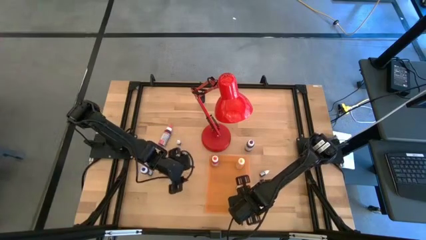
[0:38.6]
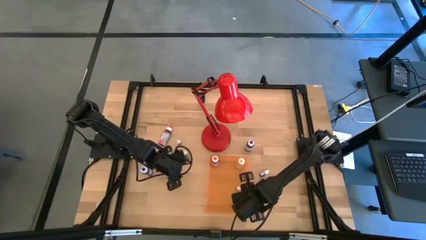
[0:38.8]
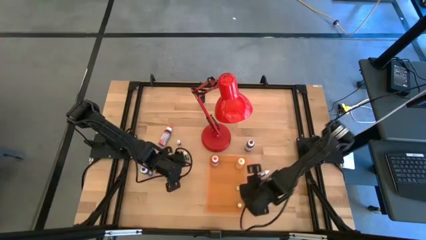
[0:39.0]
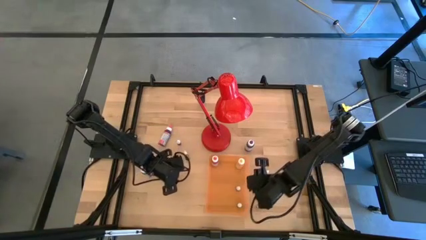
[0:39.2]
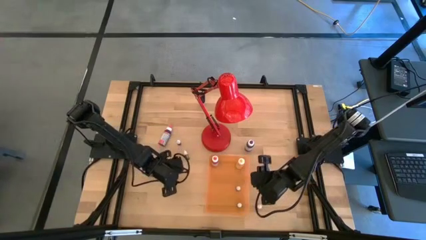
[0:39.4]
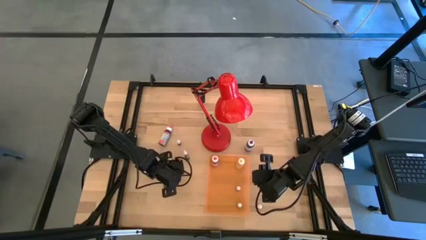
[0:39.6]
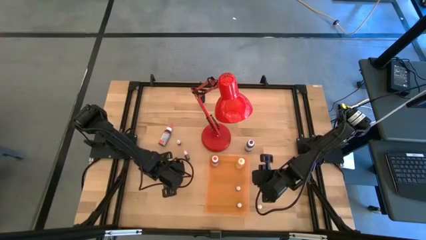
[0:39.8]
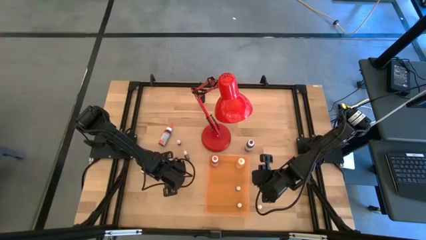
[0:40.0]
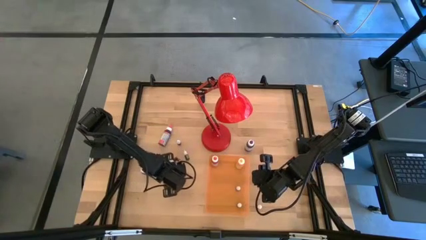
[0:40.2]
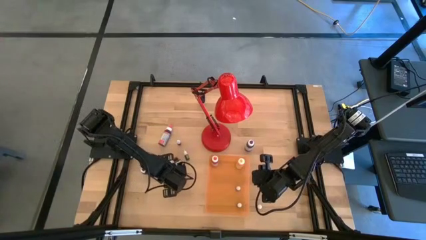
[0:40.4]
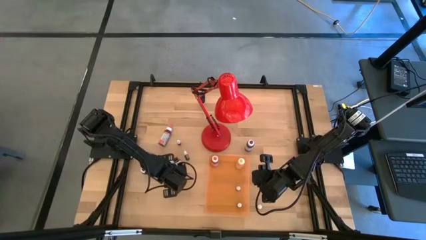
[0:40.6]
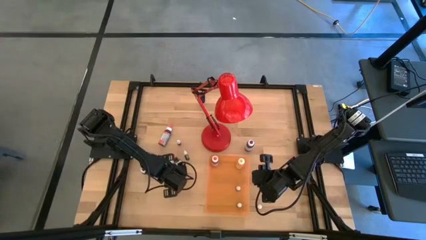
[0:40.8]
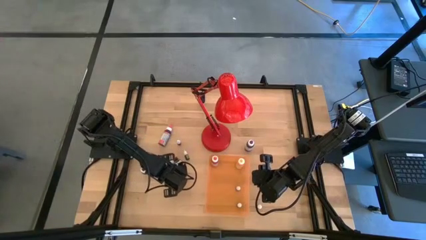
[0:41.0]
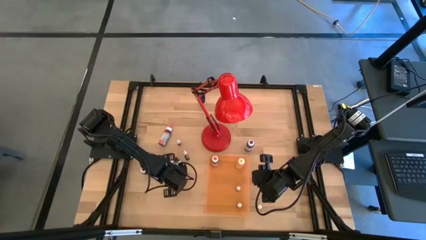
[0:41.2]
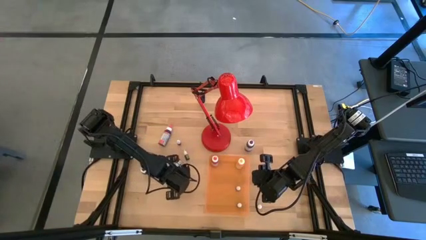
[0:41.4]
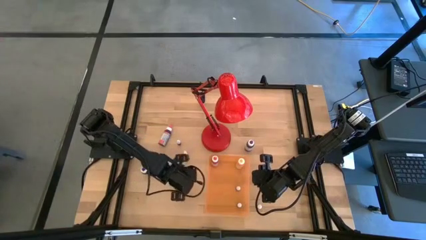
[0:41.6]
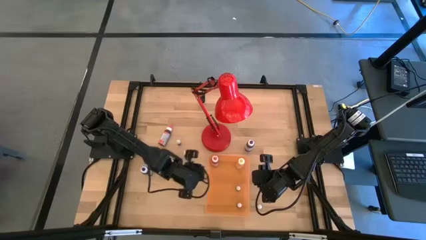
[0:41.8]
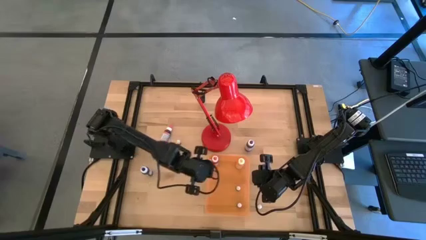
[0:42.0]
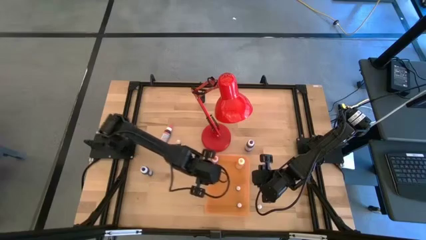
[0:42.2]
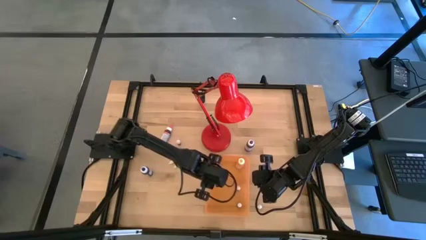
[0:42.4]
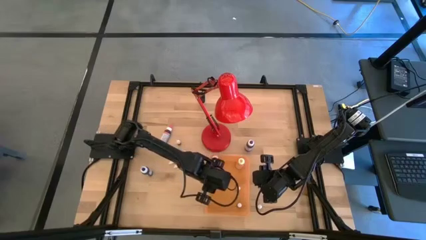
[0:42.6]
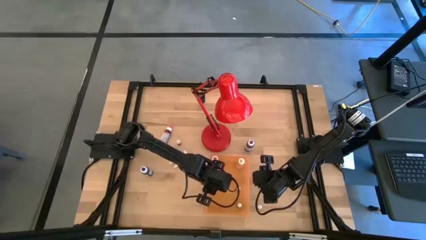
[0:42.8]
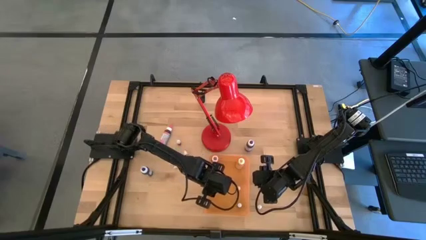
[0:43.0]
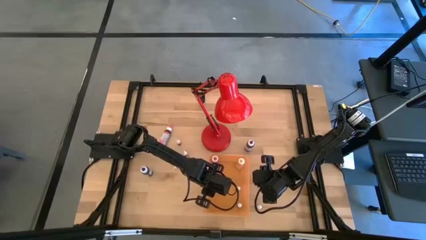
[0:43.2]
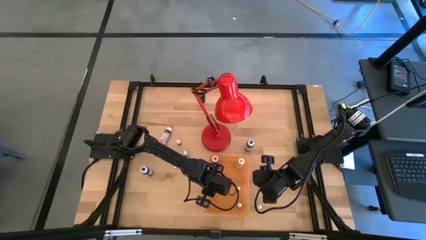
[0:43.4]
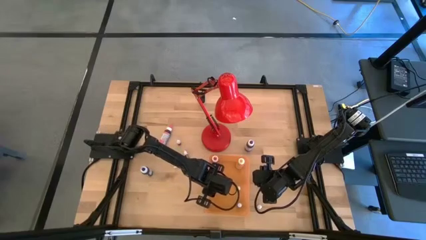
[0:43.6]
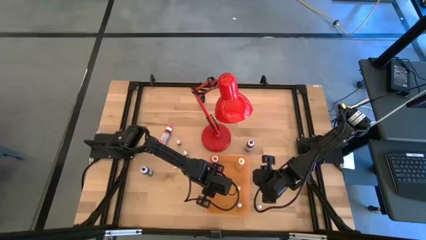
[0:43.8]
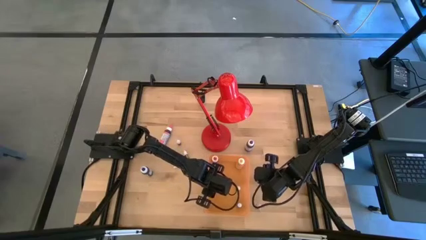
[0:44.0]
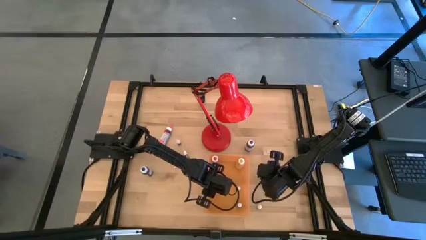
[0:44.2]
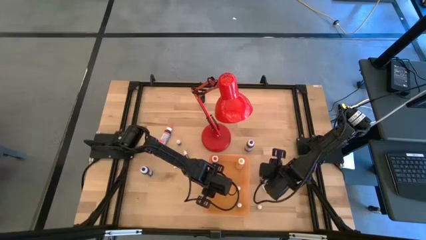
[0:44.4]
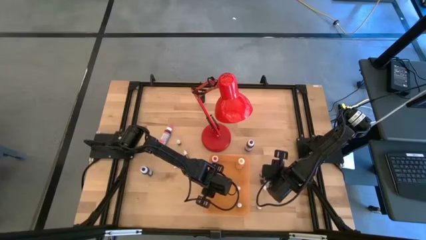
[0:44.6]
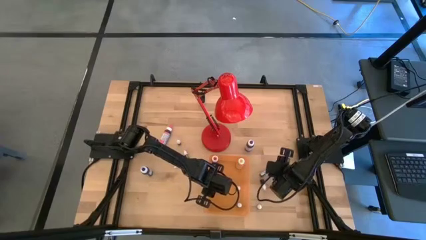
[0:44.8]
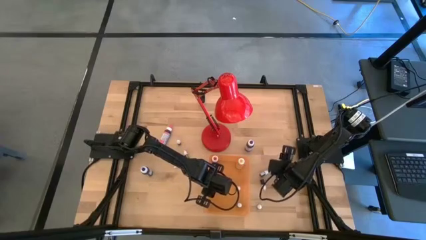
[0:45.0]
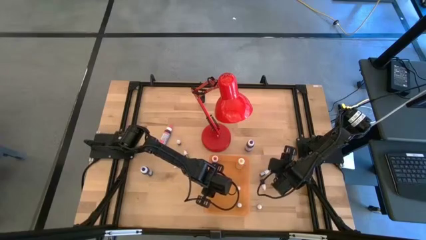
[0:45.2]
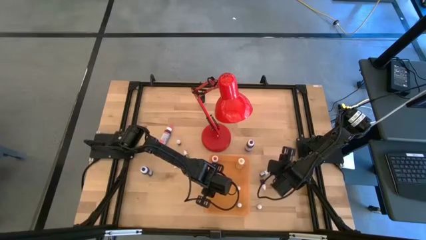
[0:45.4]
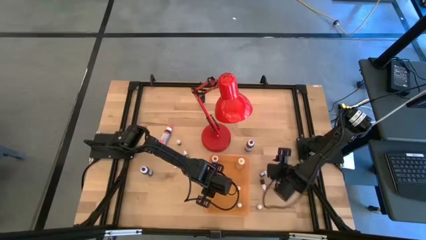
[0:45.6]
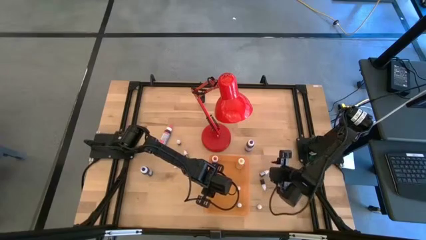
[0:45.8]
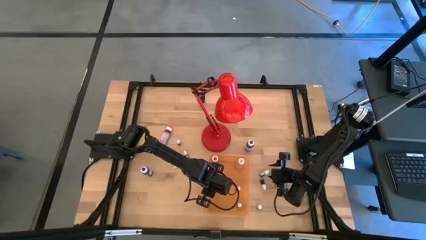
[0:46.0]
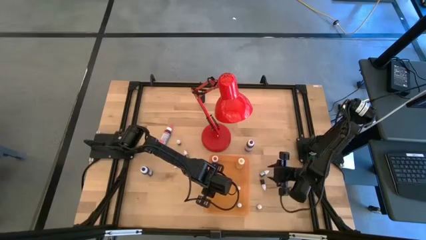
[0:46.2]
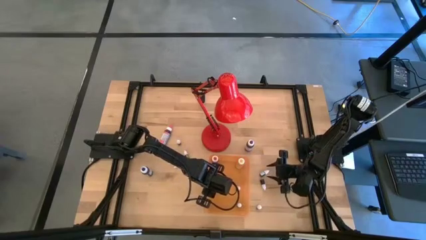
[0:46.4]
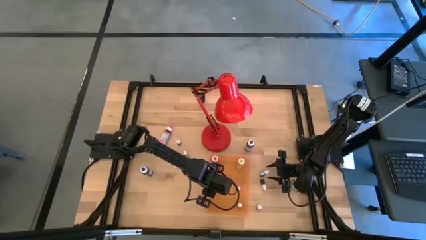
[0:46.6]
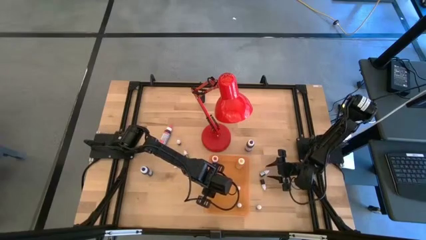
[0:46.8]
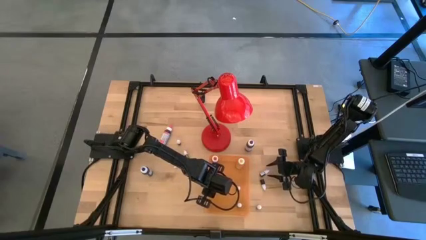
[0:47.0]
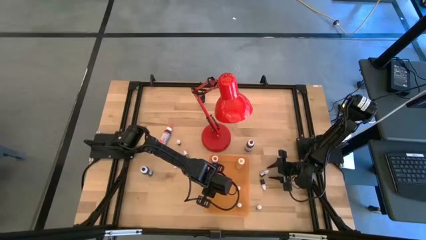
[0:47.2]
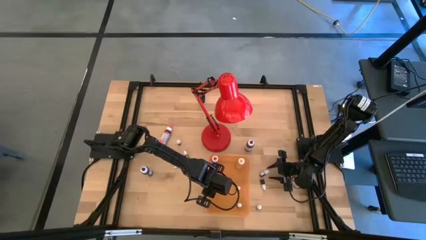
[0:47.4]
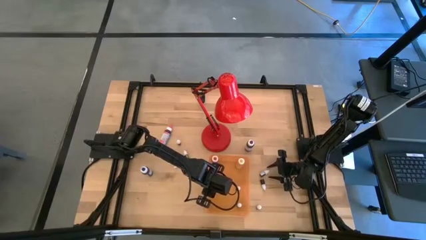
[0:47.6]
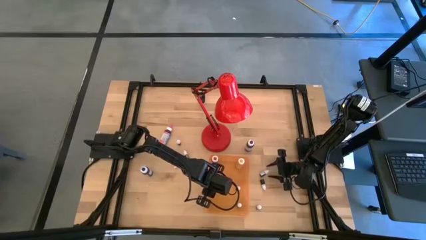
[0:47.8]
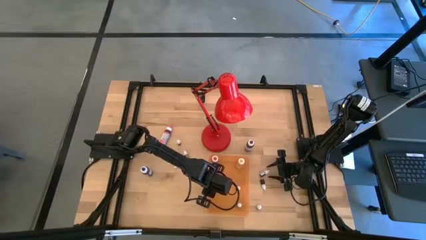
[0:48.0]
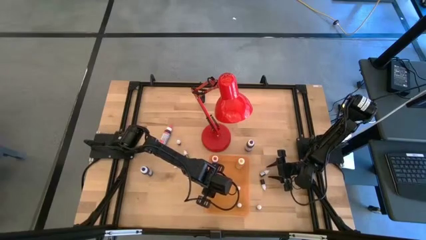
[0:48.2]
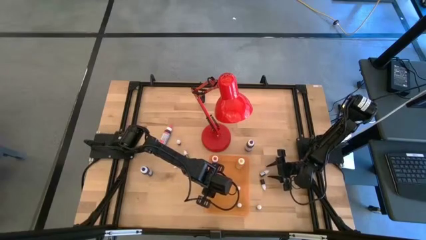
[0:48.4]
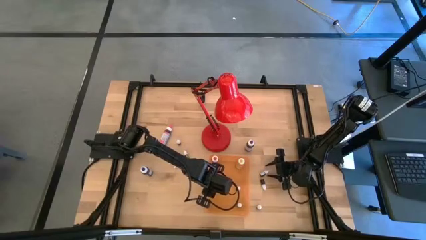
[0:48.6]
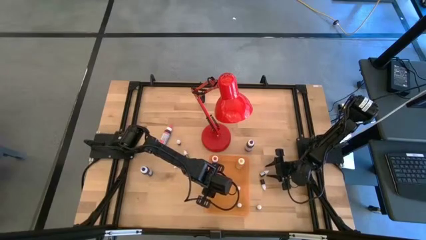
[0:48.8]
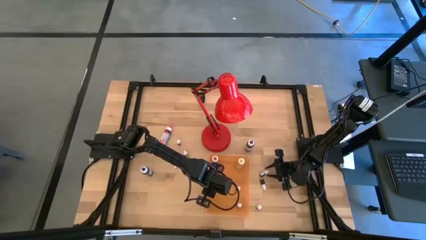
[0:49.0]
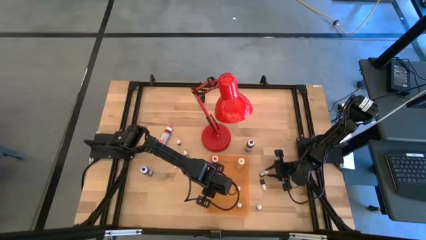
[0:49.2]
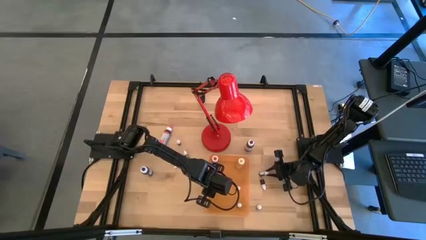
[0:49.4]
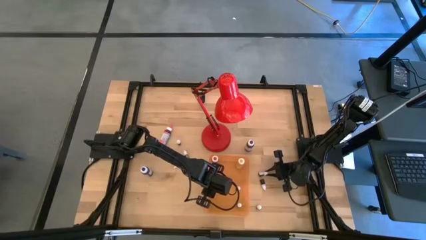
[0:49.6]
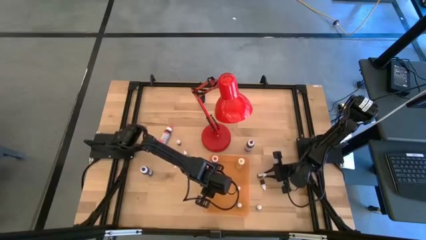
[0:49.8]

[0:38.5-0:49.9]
Task: Pick & Place food coloring
Put the small black food coloring bottle into the orange bin

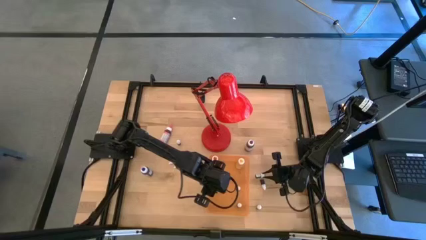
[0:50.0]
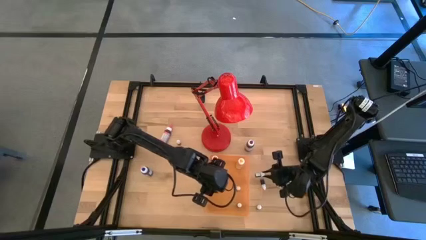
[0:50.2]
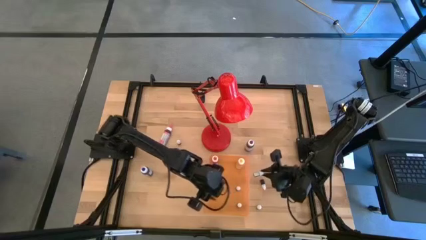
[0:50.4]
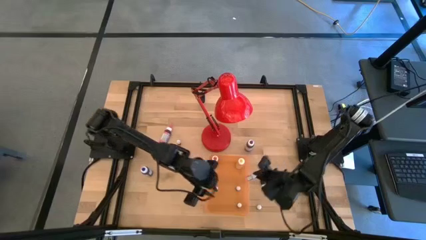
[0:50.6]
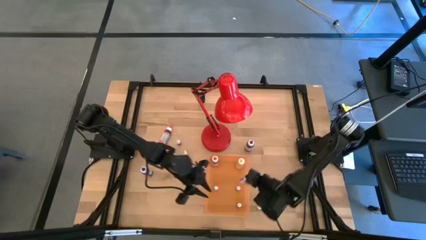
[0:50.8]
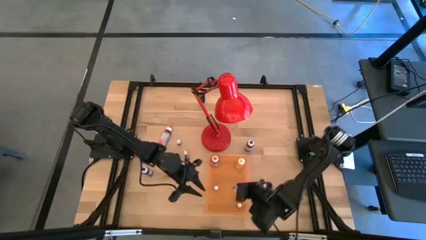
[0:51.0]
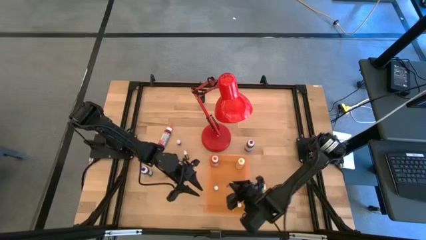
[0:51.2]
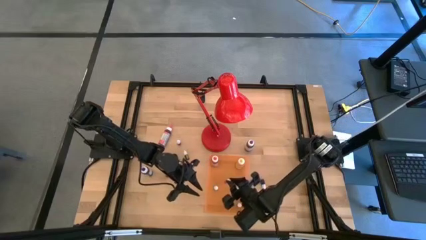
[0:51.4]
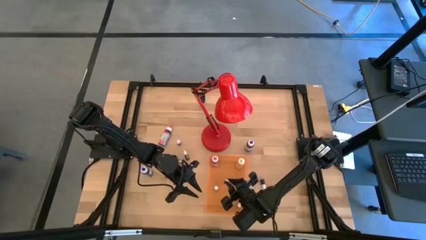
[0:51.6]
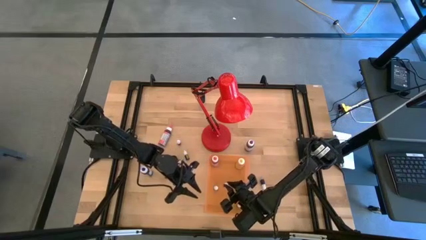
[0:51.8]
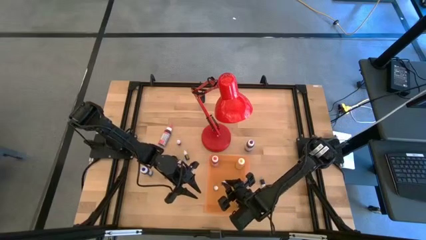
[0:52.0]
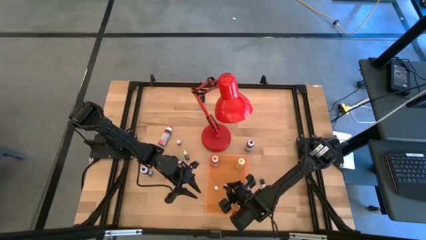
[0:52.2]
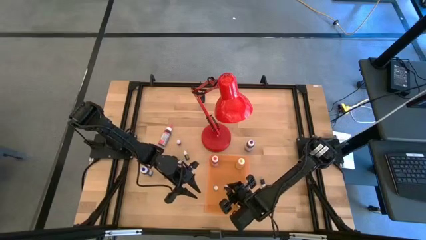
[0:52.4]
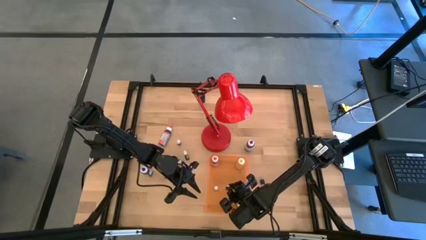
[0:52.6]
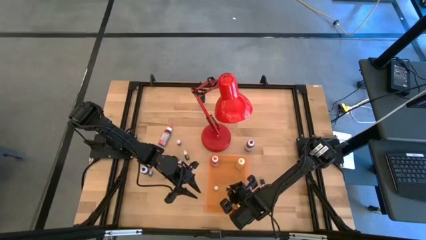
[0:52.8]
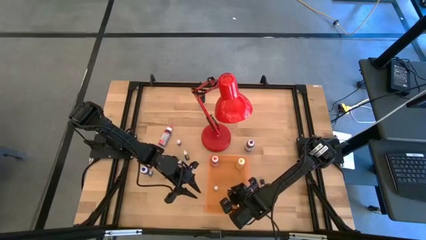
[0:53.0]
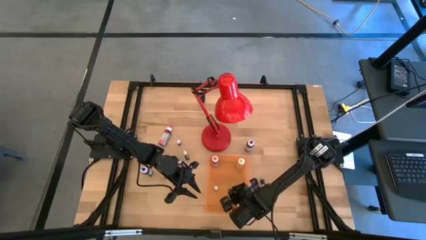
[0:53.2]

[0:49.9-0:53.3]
Put the small black food coloring bottle into the orange bin

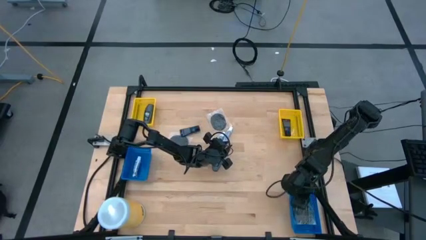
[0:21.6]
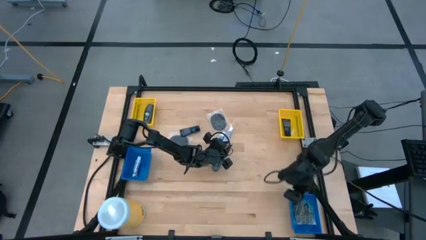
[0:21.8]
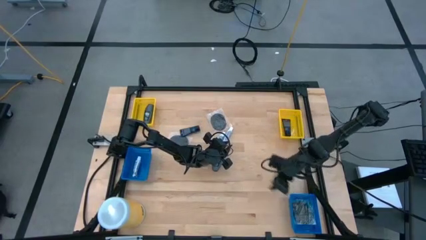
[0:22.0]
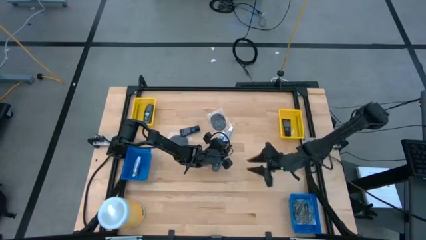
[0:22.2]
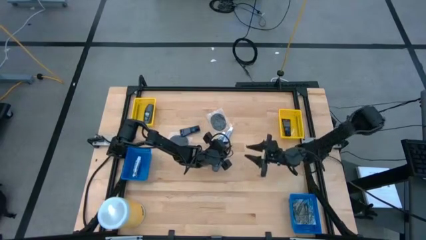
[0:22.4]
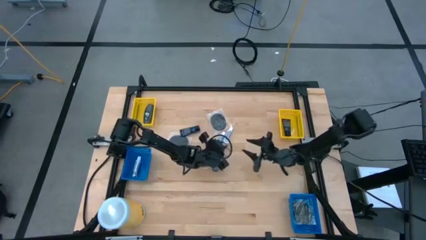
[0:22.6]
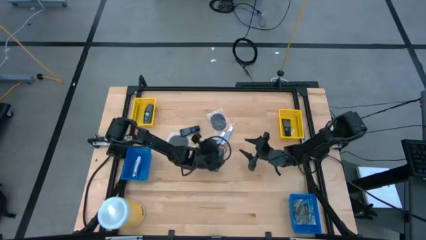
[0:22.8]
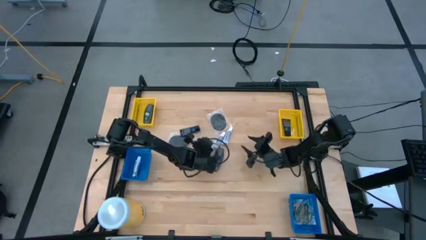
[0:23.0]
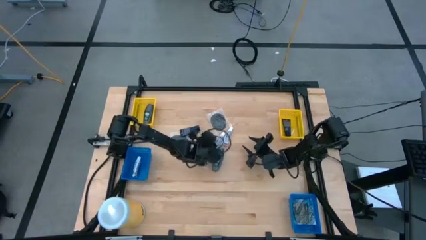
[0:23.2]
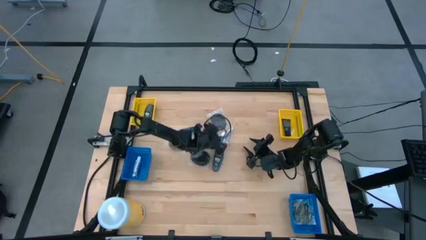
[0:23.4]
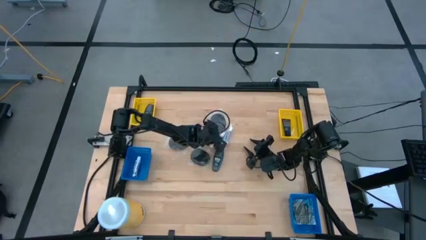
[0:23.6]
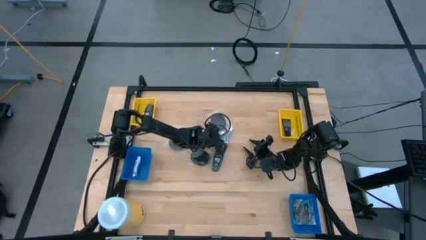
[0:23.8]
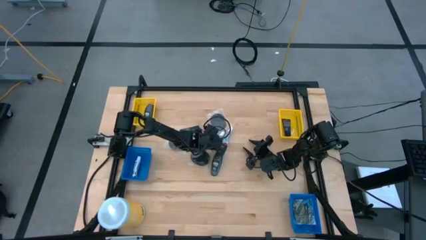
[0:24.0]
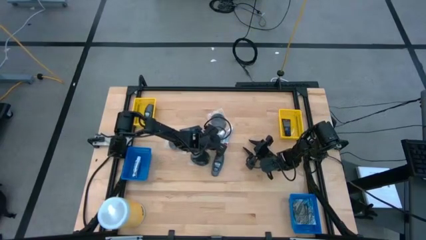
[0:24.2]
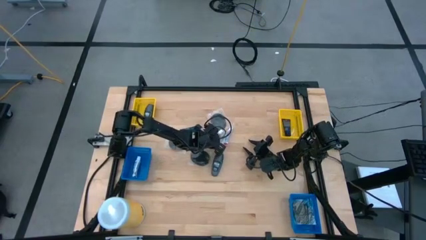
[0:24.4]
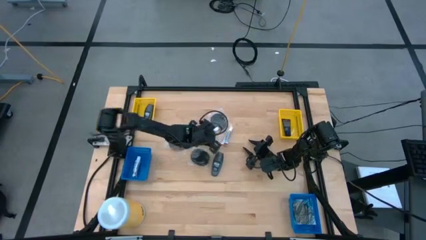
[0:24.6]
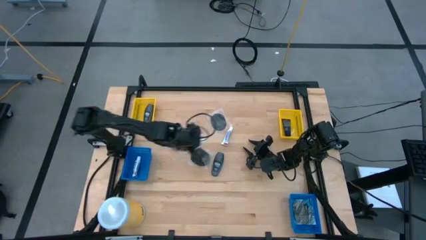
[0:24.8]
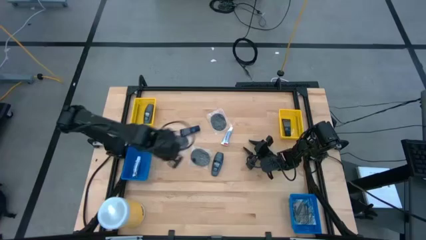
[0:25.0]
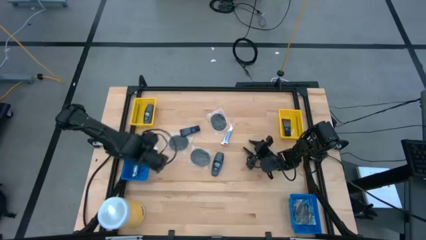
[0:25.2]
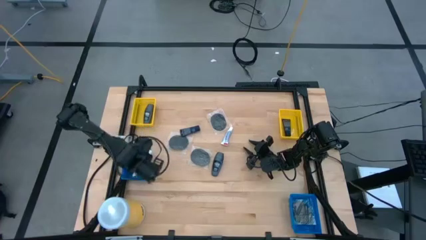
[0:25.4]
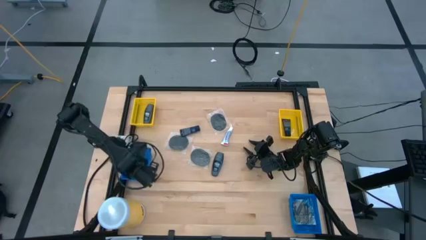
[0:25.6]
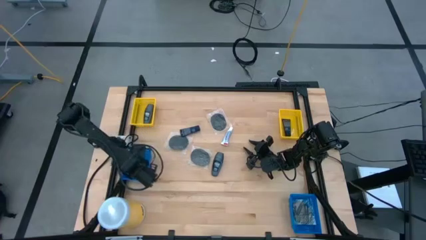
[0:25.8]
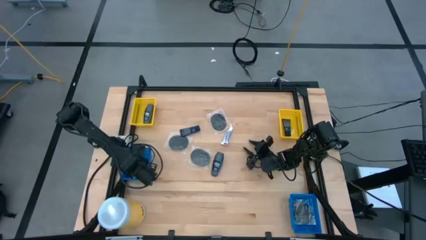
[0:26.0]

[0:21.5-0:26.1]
Task: Pick & Place Travel size toiletries
Put the white toothpaste into the left blue basket
